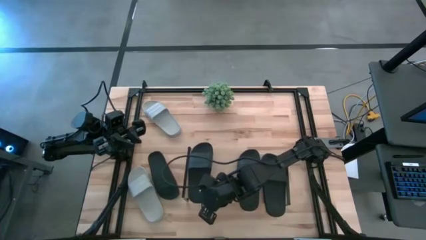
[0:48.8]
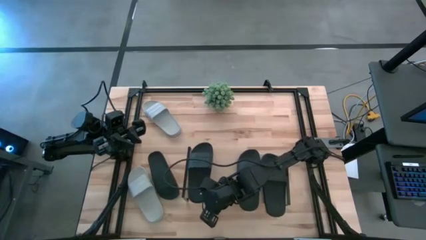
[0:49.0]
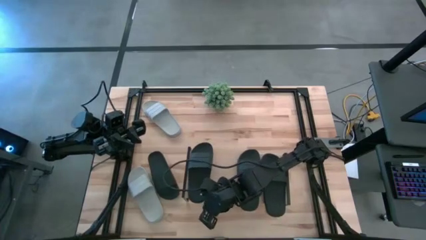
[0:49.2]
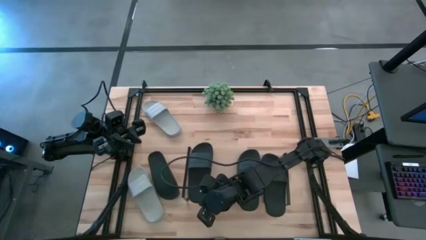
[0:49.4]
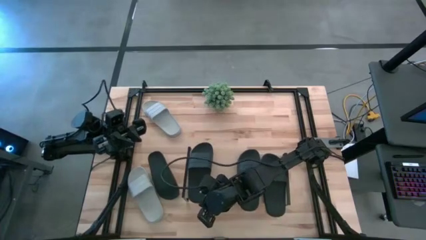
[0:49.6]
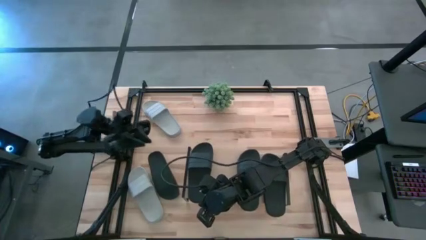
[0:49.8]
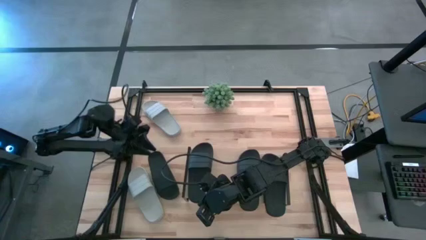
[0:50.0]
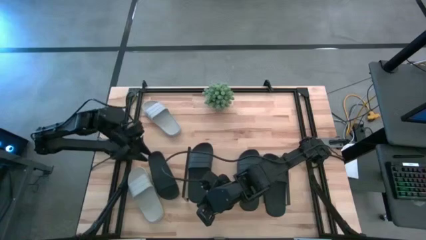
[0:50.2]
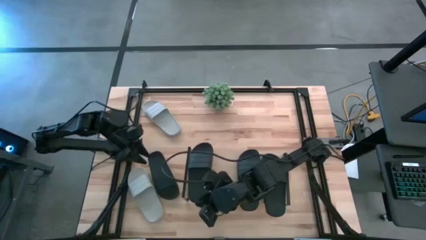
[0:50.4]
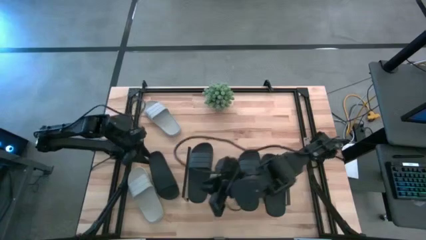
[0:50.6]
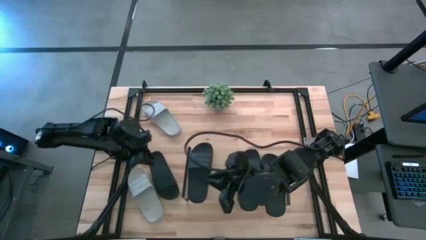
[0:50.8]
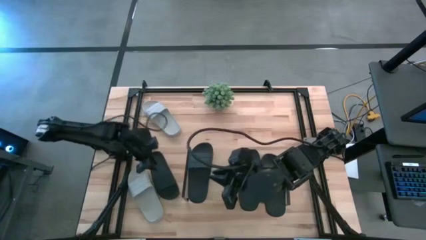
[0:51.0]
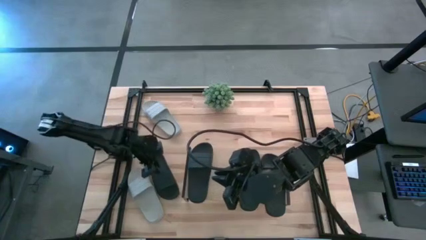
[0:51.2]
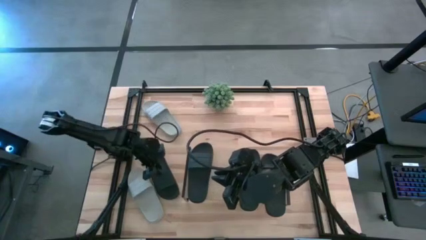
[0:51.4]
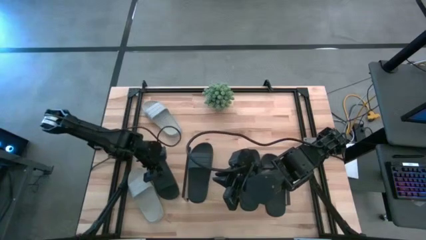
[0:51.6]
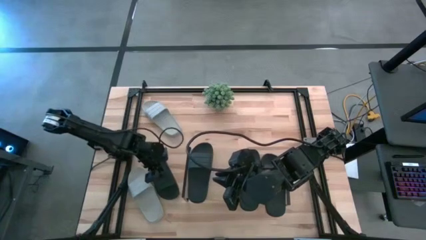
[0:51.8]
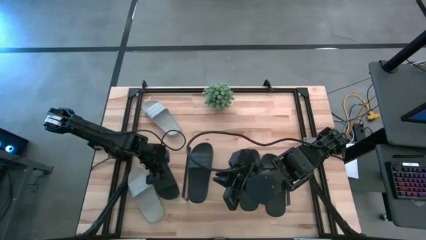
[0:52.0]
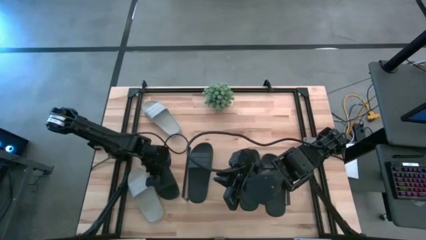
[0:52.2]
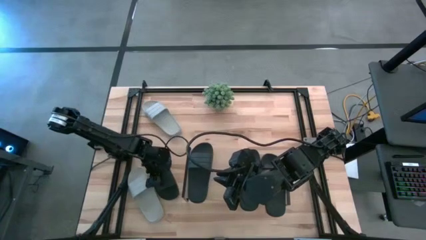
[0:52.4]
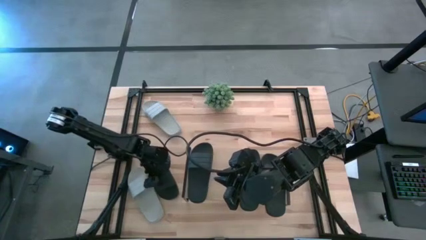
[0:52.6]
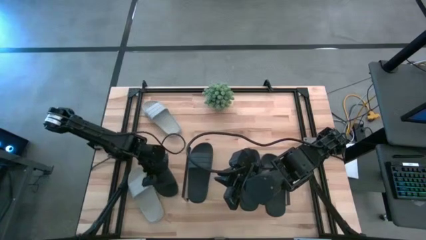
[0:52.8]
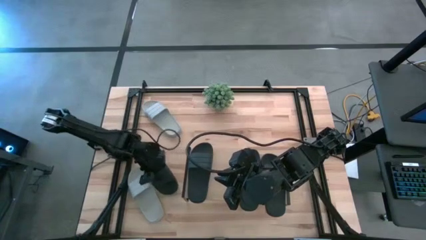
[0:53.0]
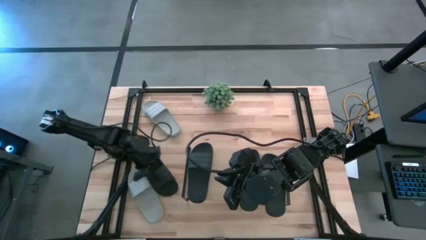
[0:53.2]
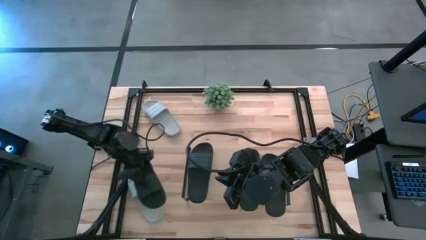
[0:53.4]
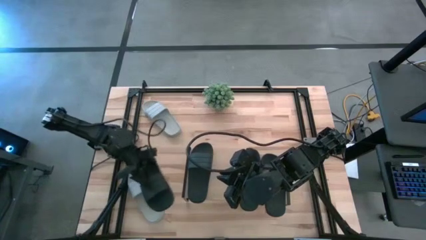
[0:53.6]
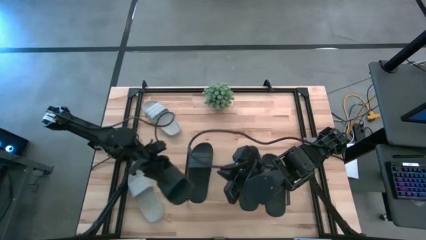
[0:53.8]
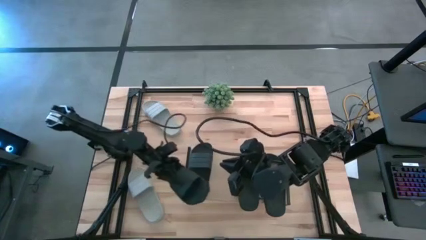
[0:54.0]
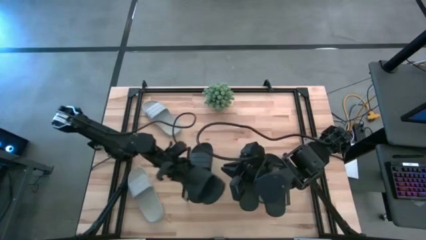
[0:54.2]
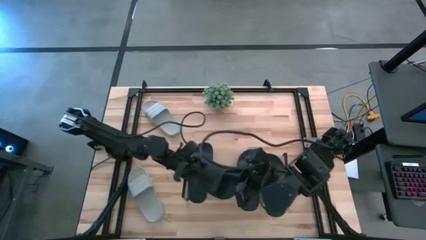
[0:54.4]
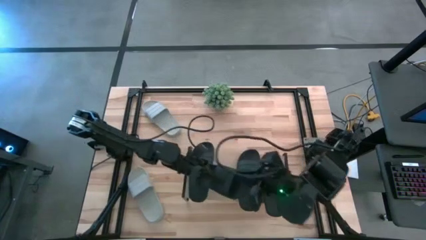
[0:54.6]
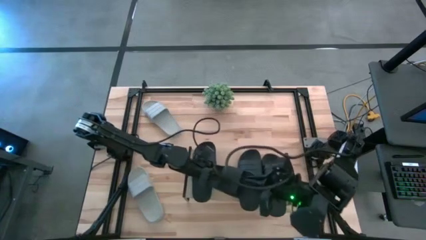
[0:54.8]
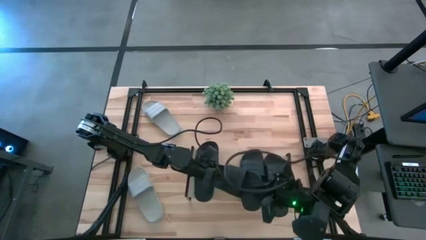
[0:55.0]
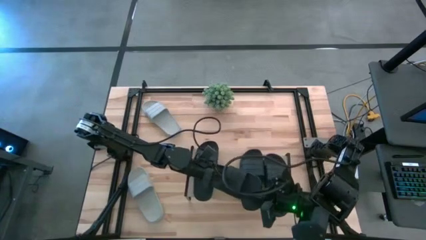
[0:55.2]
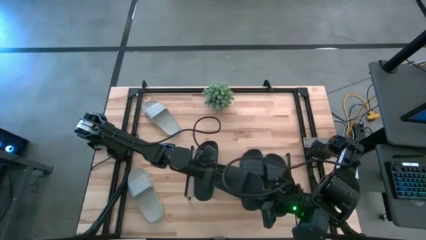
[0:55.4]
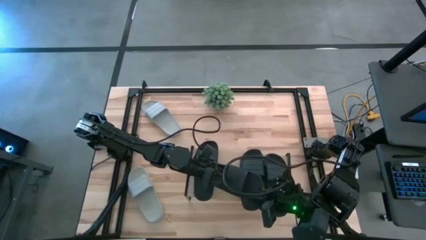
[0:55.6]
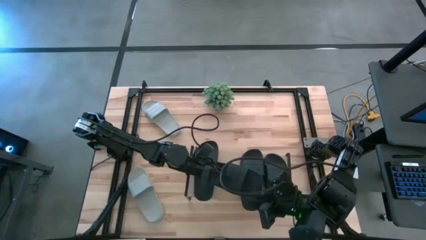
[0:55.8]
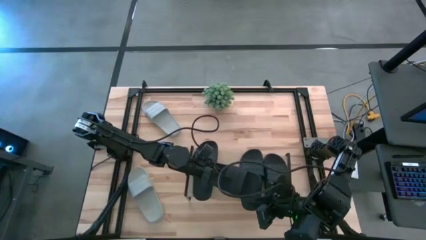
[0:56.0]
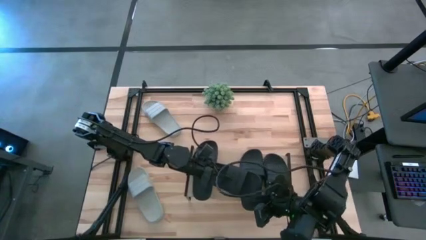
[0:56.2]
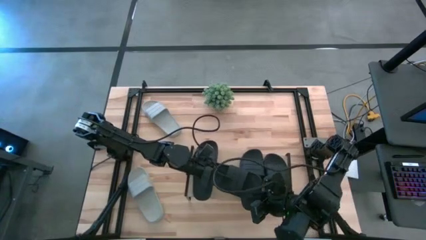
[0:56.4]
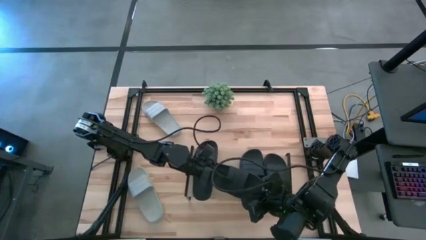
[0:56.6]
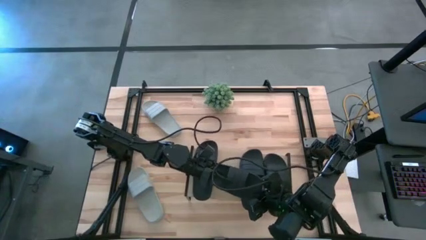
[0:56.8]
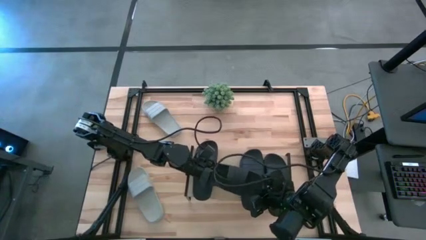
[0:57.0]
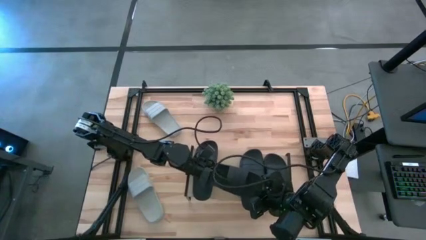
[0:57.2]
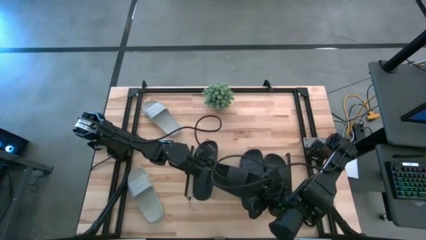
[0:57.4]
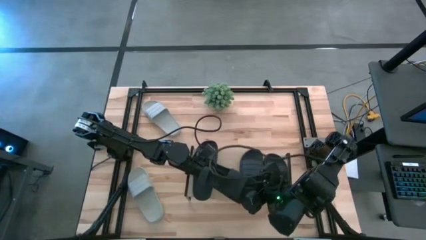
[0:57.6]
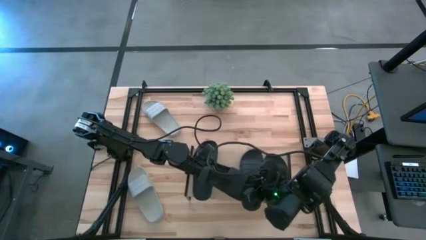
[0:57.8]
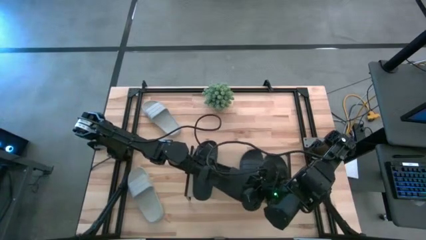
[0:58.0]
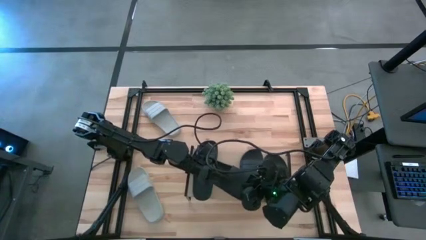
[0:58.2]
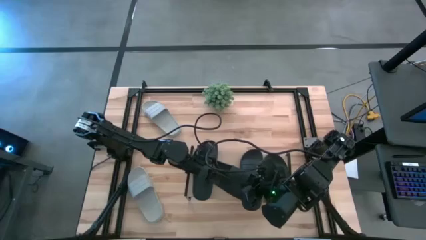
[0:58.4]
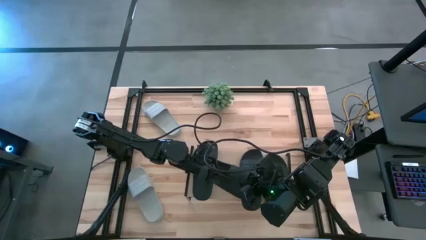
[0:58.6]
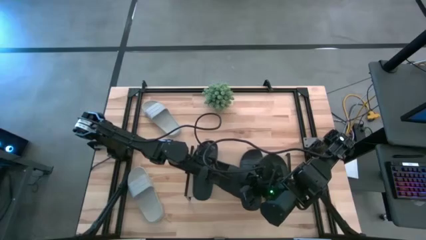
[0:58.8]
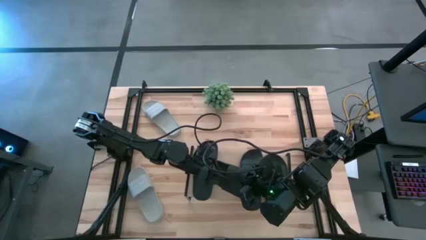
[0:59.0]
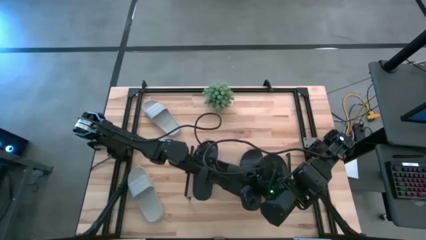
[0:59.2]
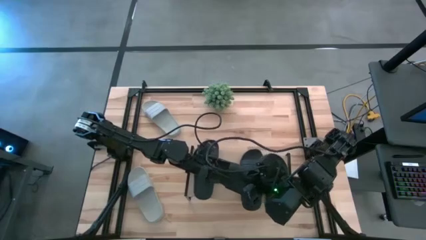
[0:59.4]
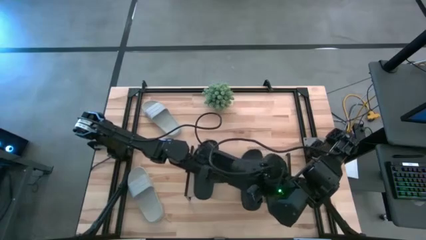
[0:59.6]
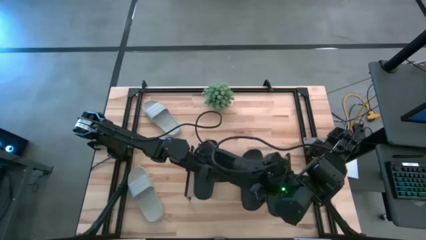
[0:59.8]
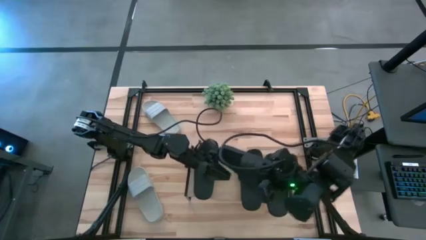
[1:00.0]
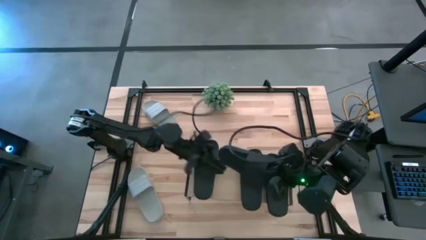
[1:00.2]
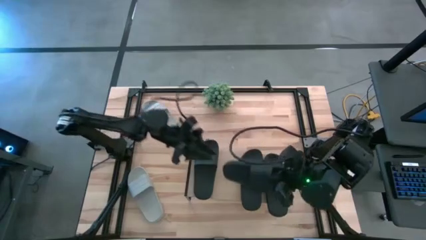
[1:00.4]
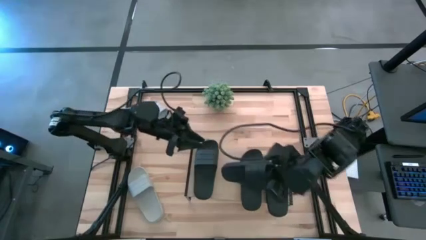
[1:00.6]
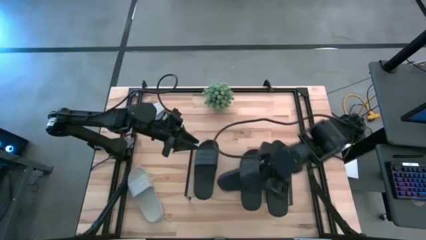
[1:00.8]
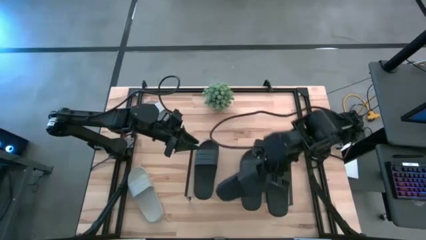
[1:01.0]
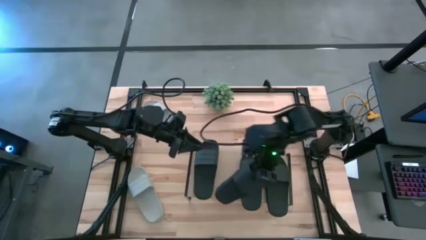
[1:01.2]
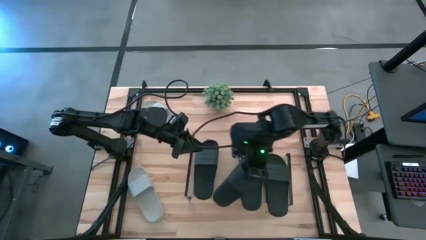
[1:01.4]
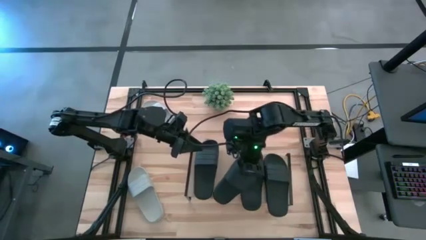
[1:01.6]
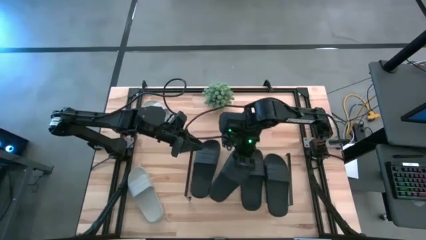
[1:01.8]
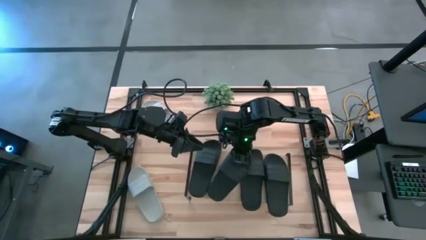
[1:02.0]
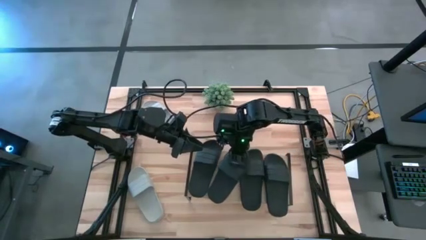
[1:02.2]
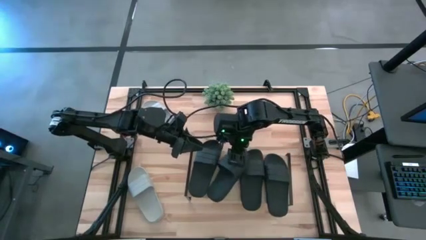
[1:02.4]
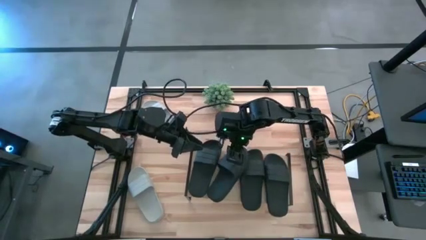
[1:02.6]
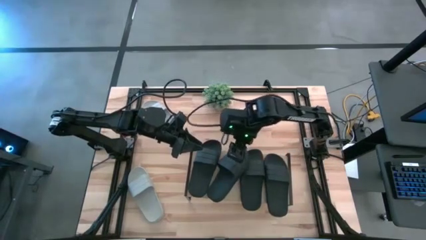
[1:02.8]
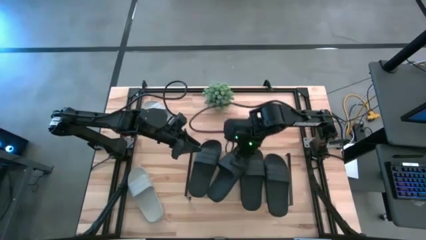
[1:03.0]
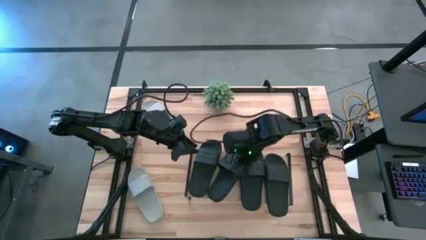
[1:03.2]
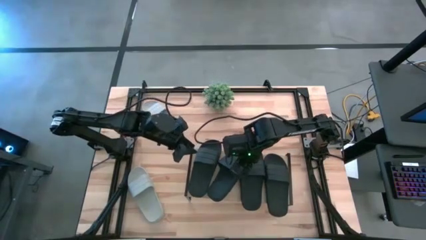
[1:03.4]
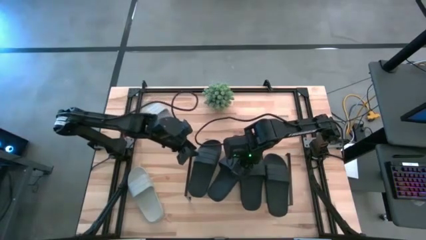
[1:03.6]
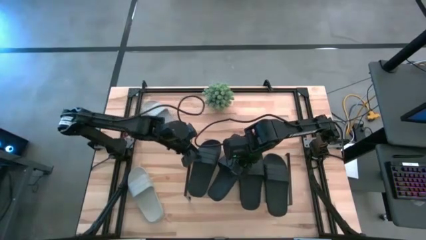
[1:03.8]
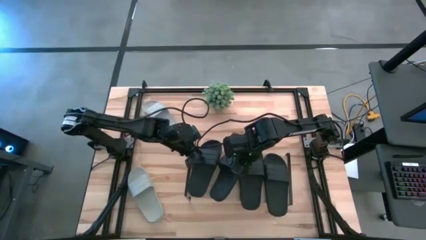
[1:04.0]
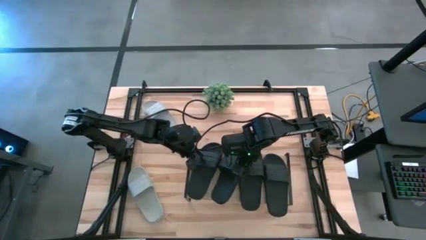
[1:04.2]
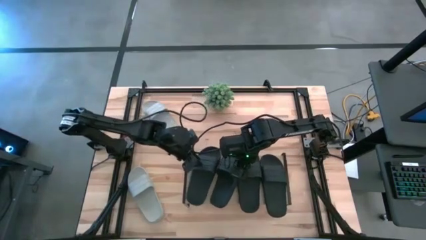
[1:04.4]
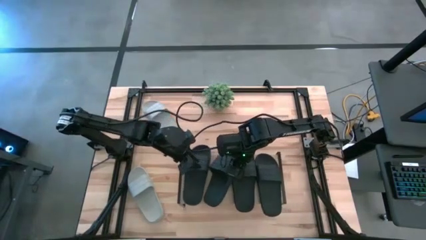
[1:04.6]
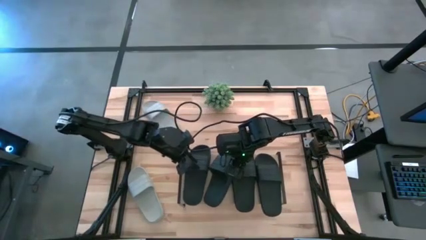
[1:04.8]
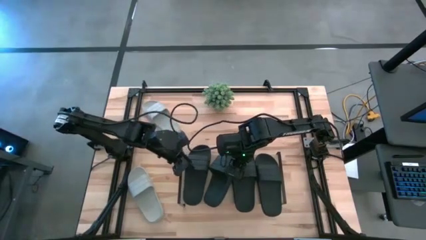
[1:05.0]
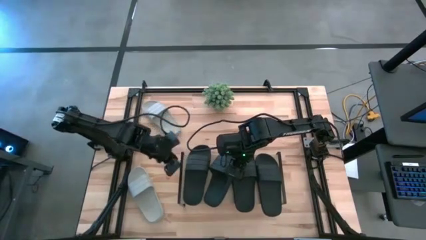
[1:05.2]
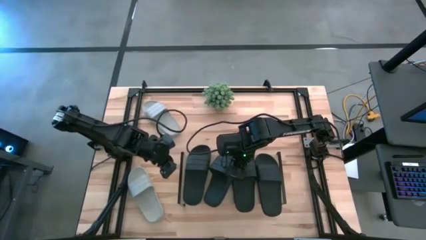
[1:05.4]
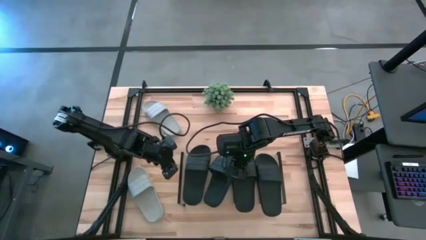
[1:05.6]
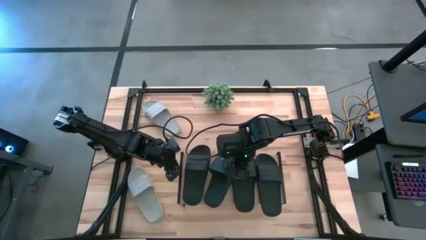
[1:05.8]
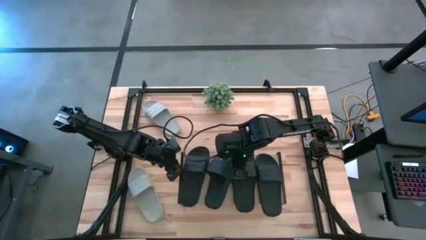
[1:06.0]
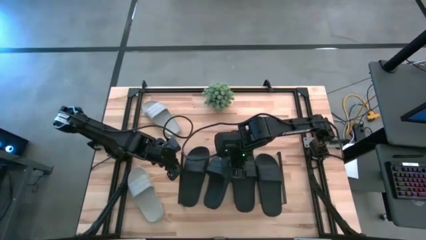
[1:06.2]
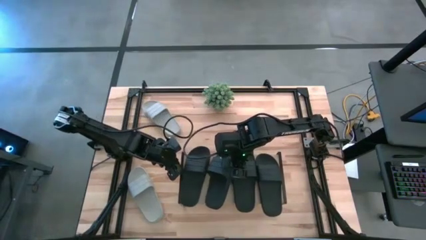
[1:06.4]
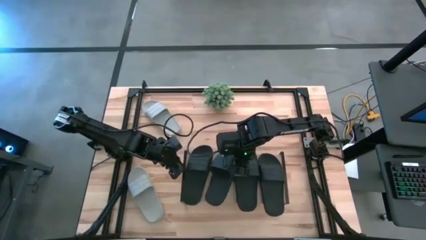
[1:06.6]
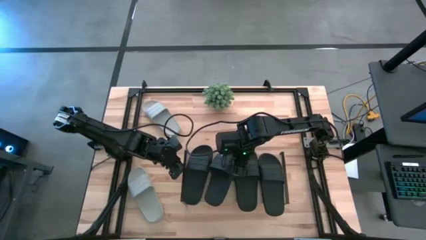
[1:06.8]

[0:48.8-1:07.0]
Task: Pick and place slides into the shelf
Put the black slipper on the shelf
